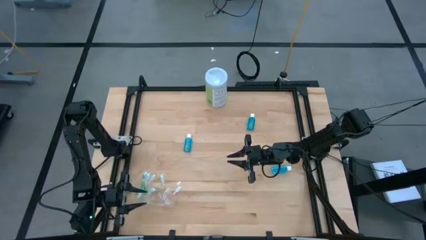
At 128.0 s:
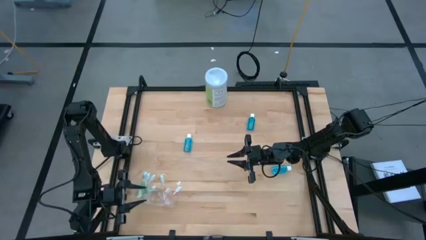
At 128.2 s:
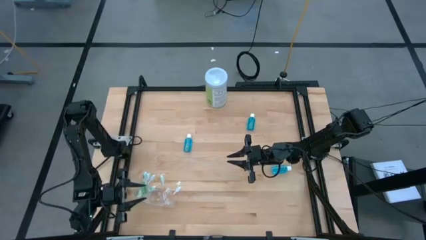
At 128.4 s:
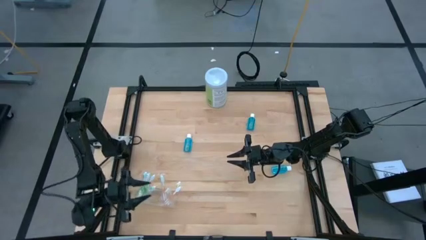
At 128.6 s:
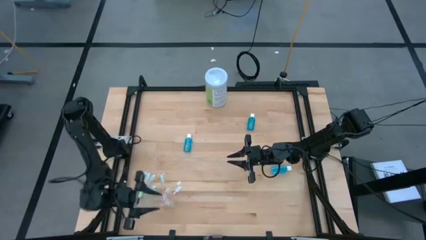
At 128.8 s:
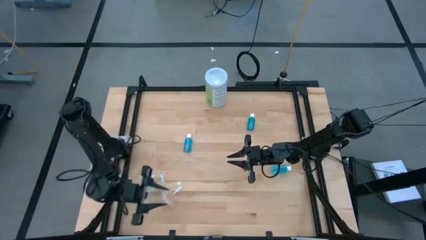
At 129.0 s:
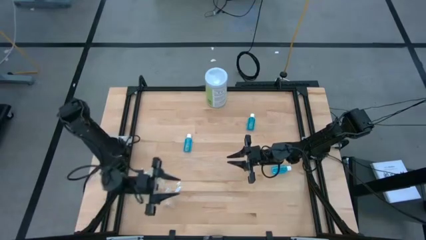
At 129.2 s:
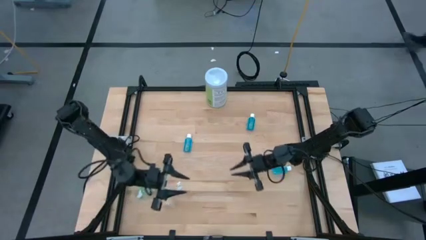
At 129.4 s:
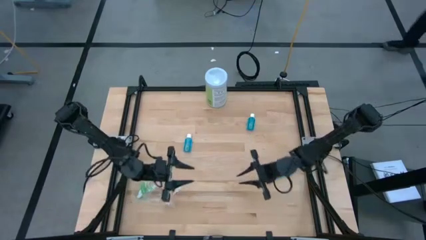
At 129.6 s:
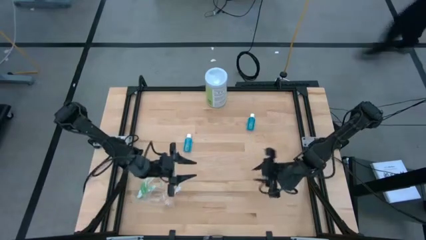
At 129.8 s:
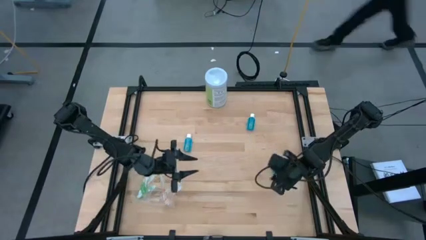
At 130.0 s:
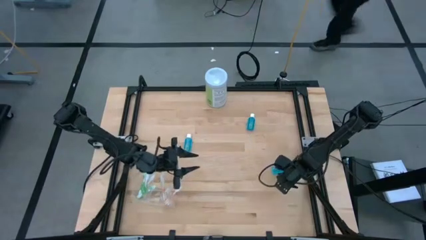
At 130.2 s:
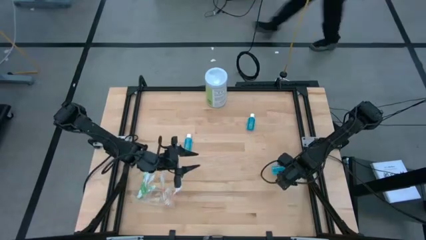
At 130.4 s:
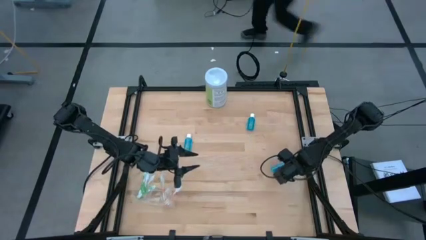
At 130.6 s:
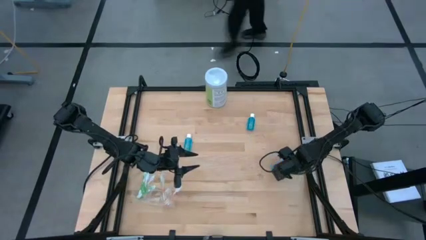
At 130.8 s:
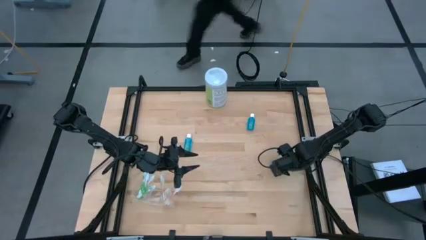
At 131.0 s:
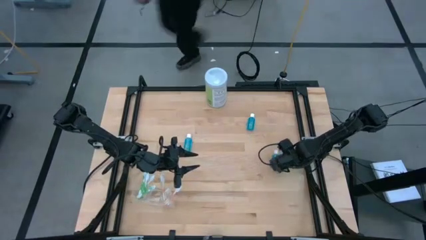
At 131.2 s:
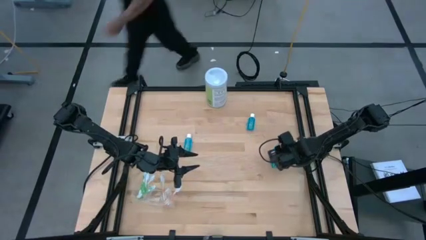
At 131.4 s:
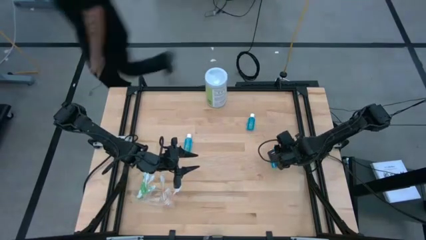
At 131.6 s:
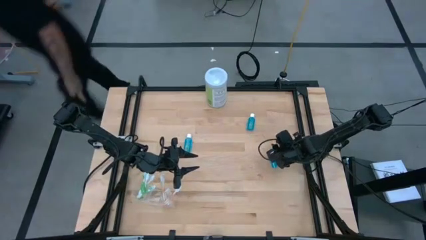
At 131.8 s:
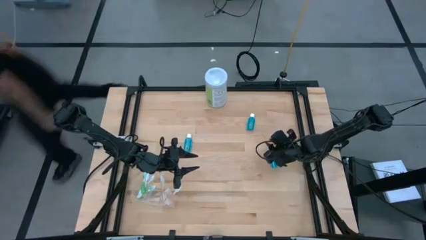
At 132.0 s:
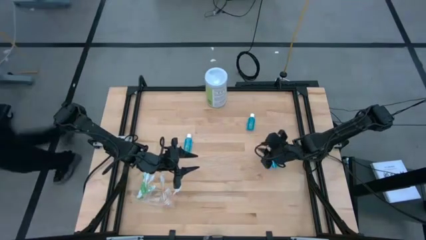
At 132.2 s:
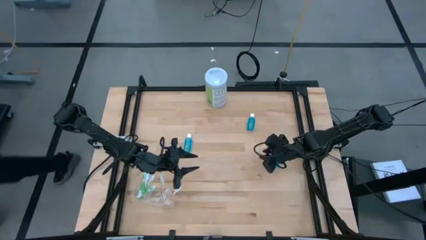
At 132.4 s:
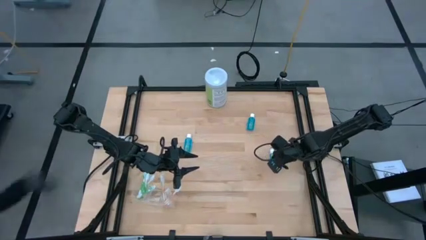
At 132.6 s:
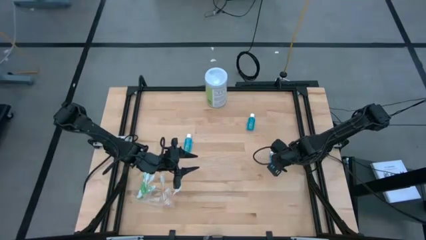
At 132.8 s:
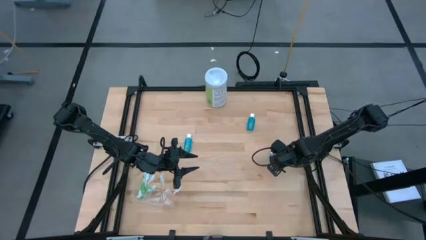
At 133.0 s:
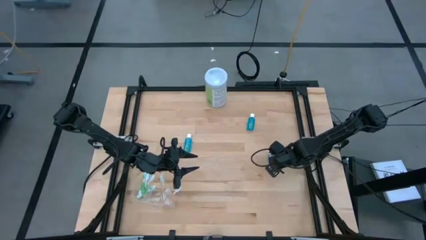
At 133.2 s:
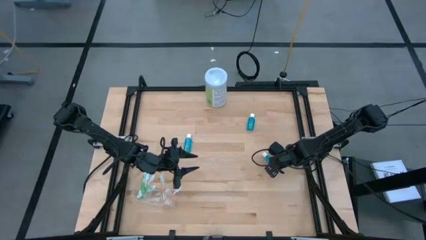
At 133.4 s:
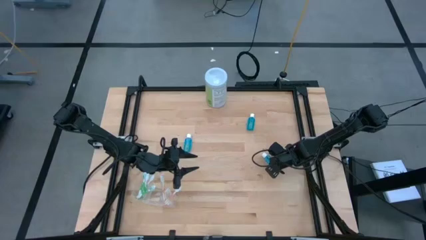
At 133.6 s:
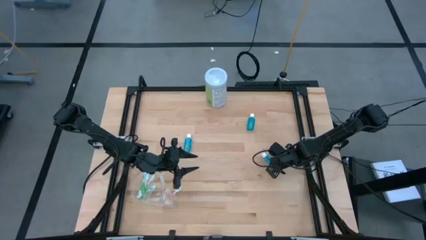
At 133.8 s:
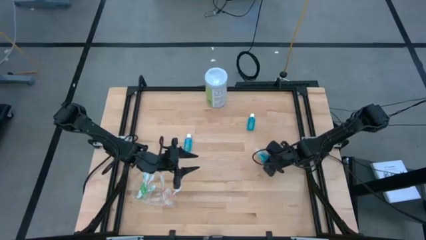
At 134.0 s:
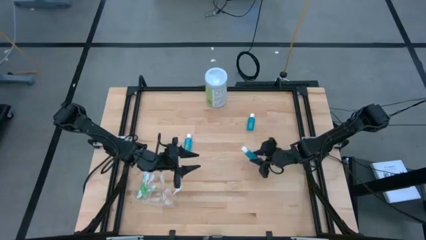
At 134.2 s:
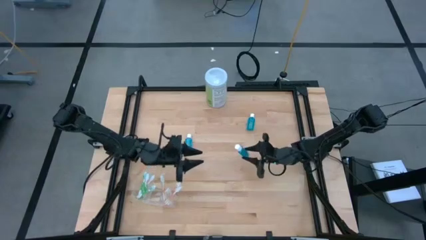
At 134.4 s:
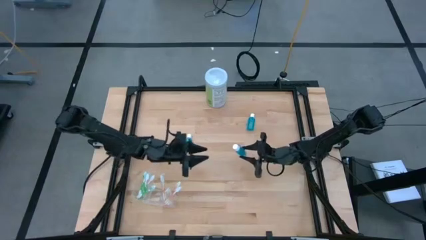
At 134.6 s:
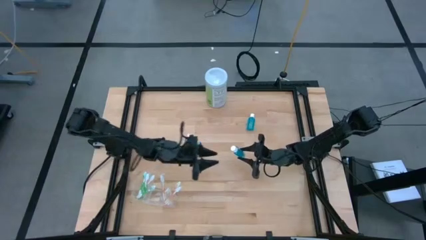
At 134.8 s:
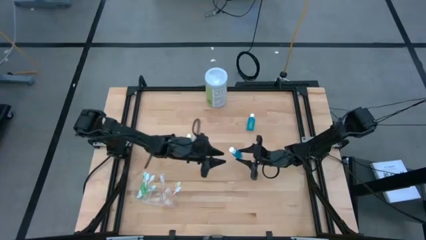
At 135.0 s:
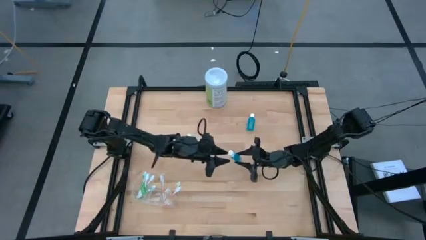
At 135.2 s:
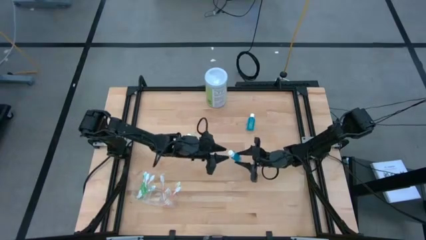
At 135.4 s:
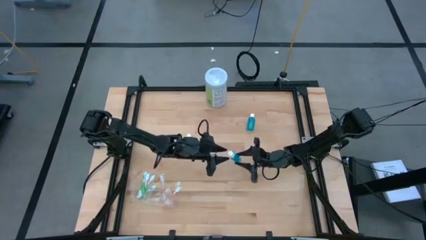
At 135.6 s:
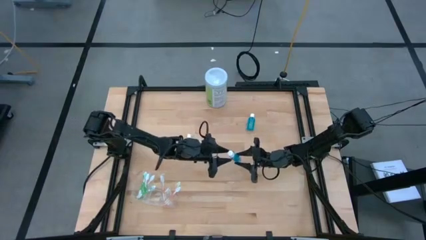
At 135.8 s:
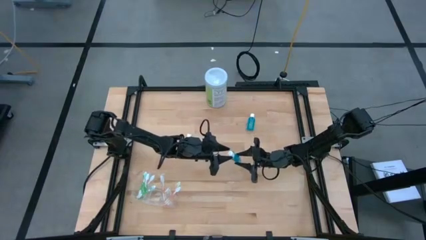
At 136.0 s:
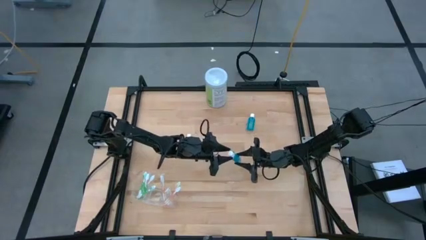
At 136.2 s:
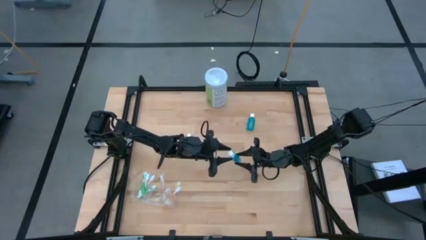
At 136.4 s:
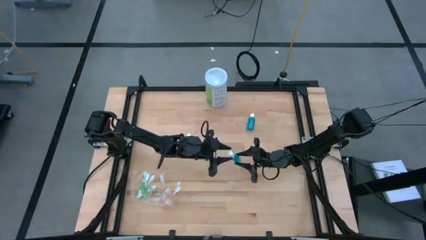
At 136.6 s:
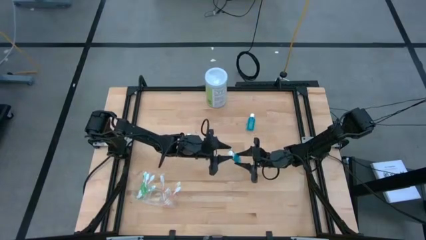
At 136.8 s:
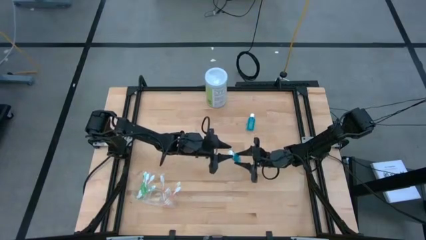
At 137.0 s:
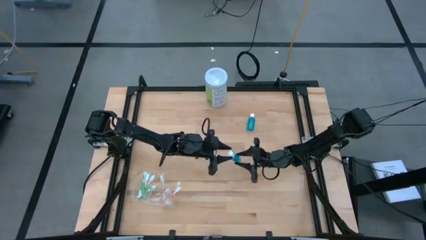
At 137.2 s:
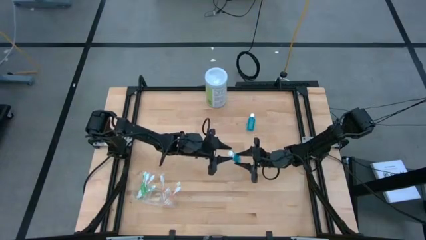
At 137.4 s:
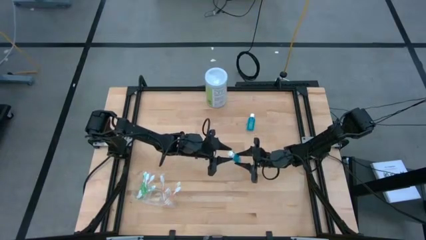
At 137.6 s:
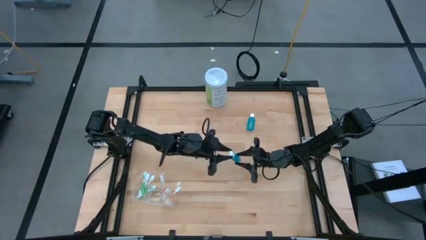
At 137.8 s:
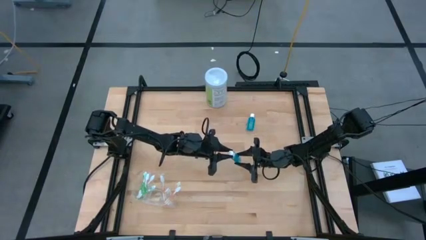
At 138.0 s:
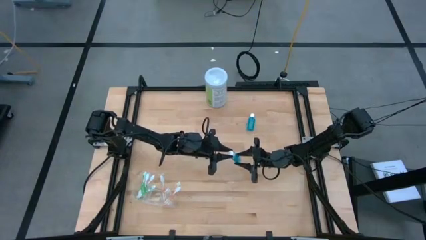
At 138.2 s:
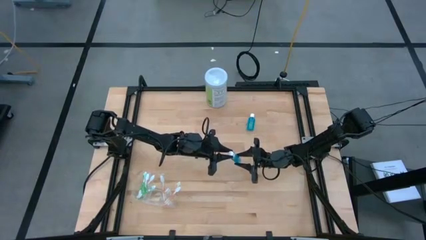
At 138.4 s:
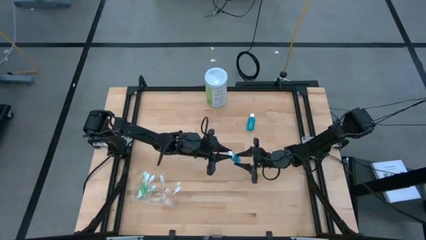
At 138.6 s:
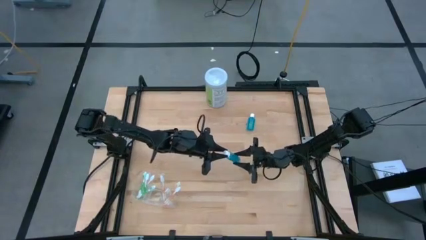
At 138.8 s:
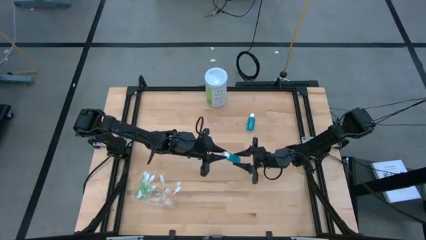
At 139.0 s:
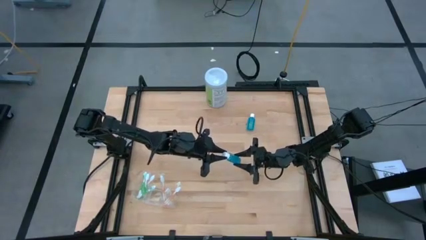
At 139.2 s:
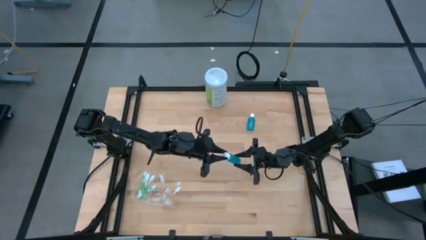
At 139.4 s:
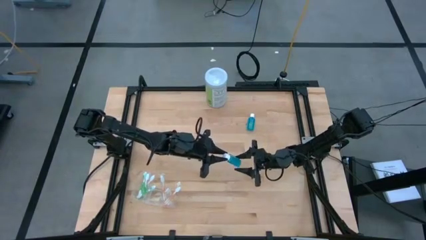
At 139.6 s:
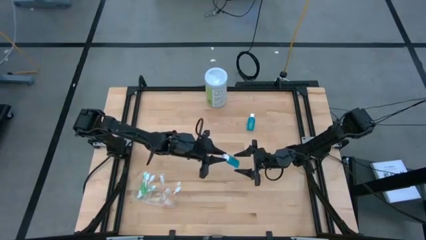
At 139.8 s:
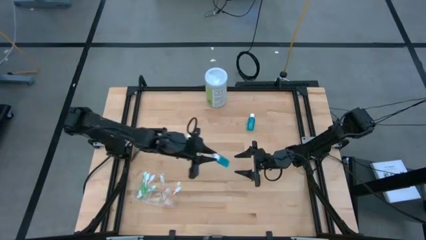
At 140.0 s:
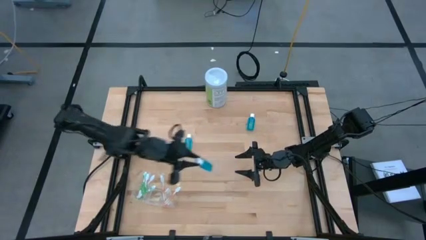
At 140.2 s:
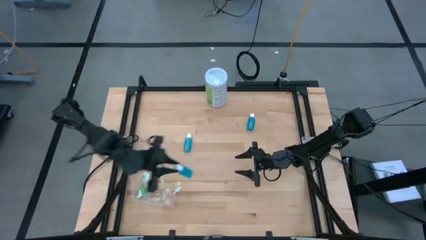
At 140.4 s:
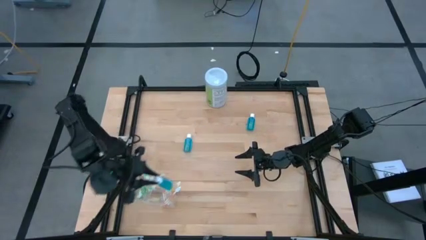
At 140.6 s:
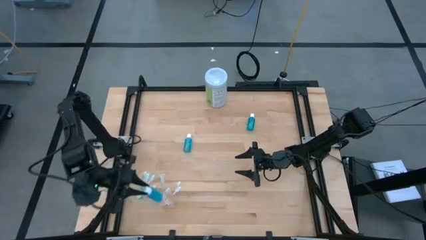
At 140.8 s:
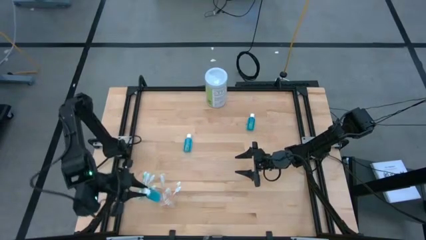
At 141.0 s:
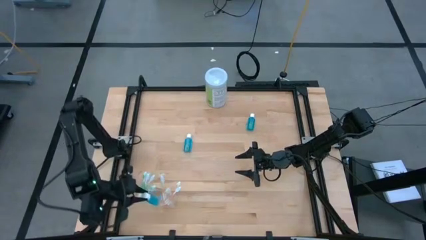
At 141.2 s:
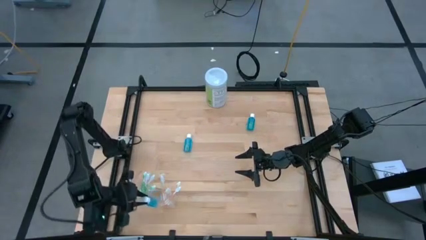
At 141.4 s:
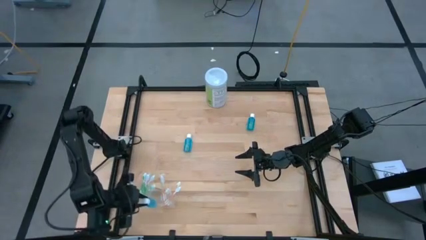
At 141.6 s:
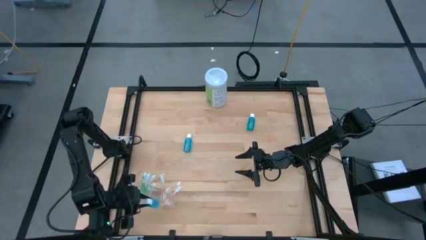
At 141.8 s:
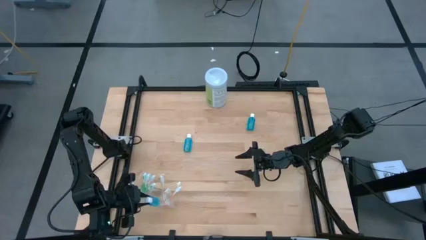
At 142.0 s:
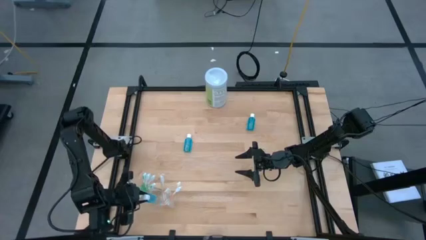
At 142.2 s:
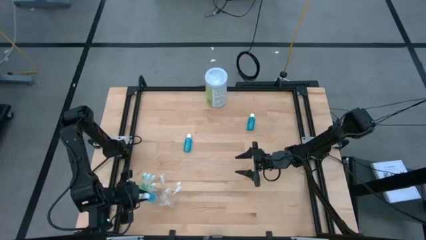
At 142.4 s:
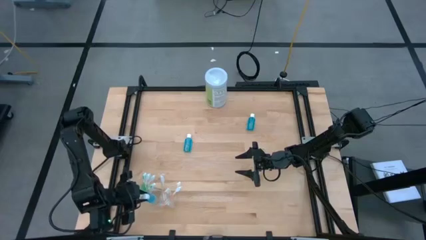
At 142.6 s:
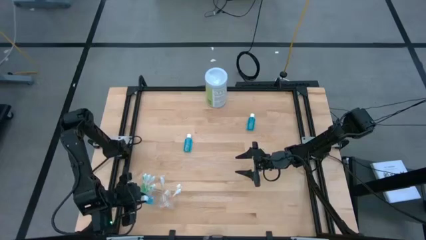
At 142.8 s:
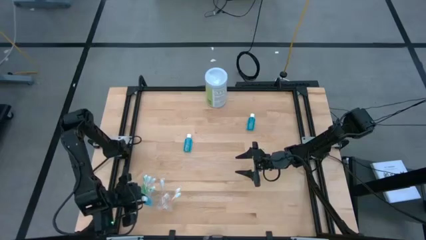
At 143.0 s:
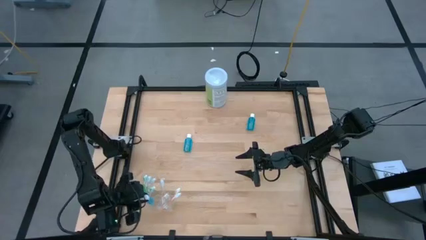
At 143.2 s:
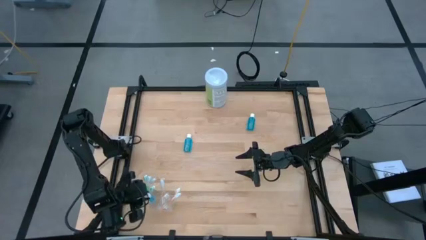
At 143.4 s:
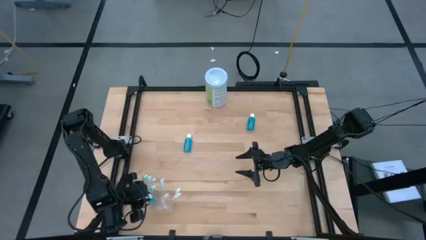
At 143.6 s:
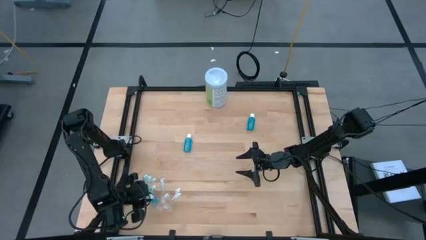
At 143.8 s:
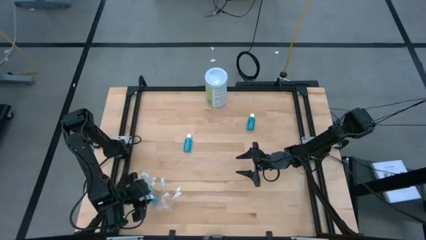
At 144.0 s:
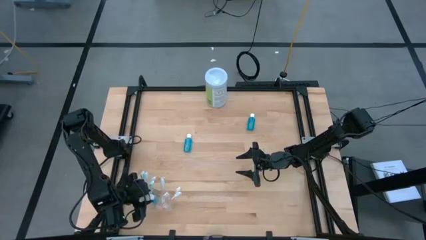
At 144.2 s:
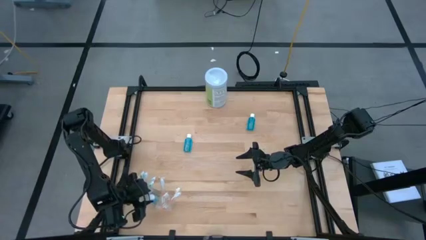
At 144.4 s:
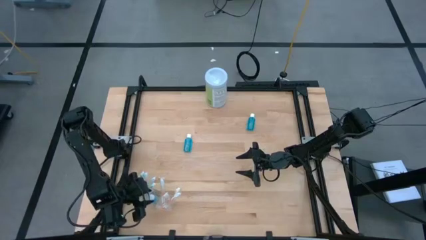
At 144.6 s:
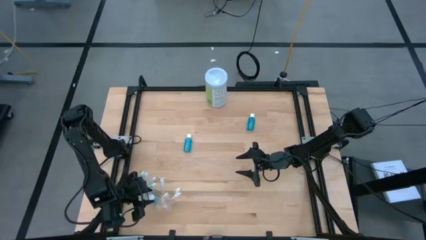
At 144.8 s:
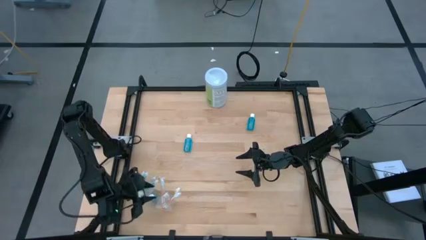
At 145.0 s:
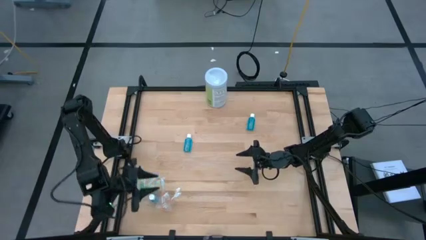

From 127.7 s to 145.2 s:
Task: Pick & Place toothbrushing station
Put the blue mouthwash into the transparent organizer
